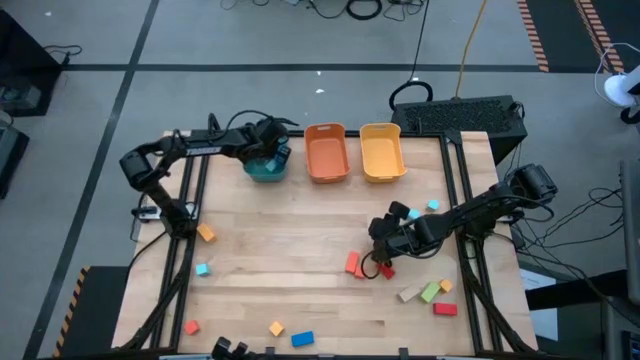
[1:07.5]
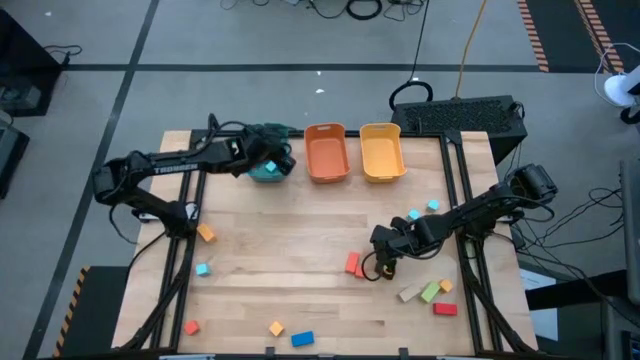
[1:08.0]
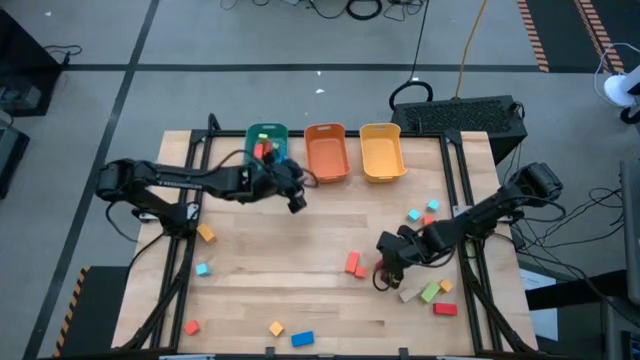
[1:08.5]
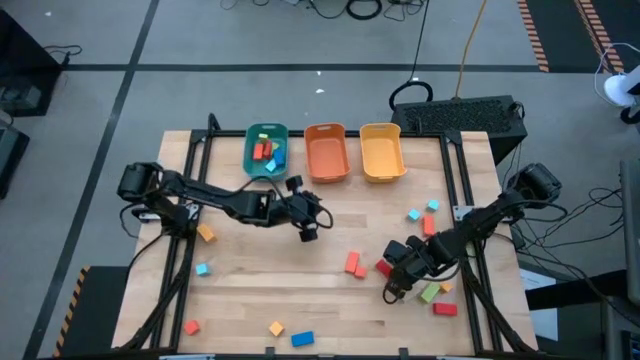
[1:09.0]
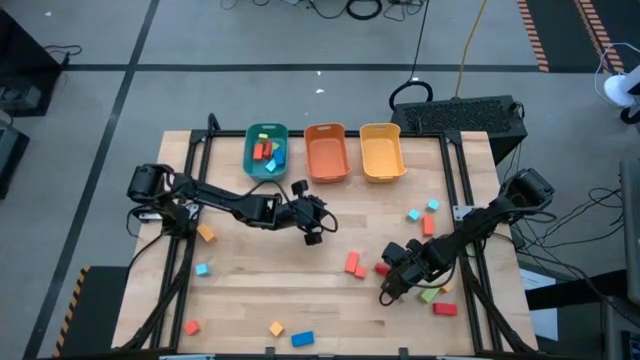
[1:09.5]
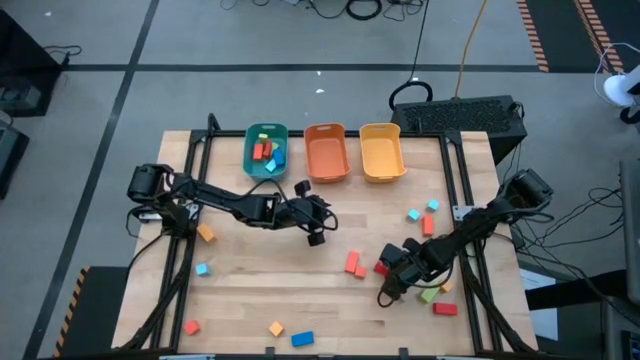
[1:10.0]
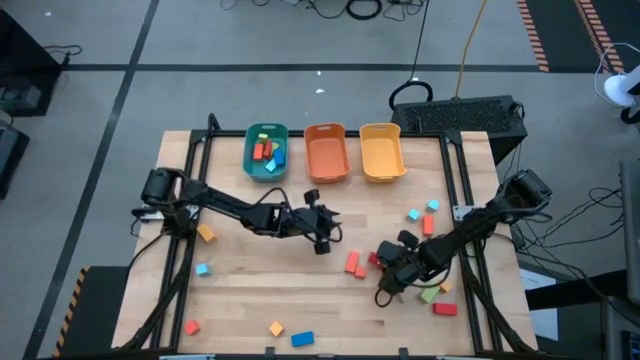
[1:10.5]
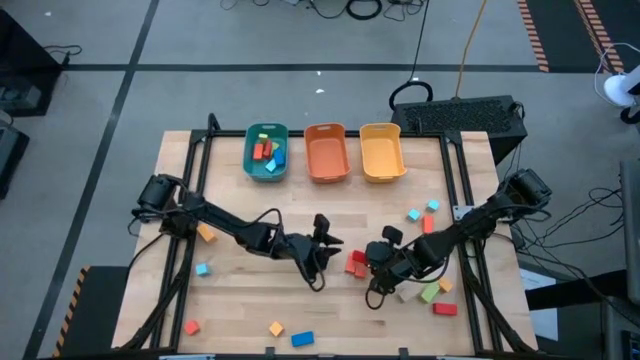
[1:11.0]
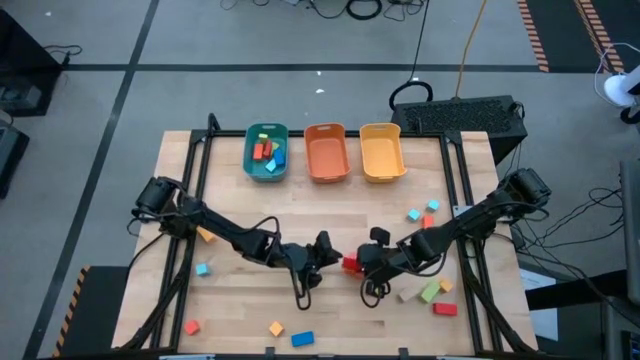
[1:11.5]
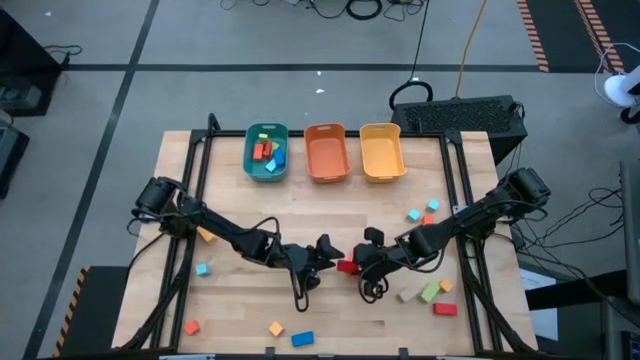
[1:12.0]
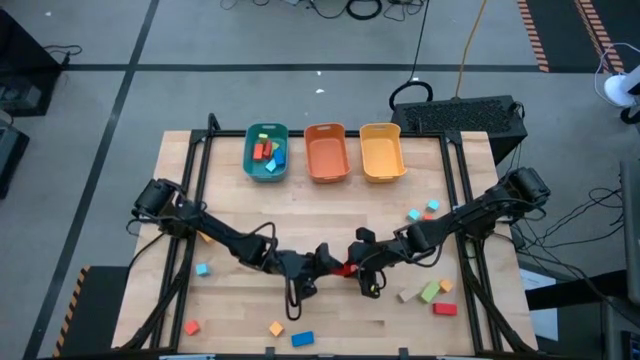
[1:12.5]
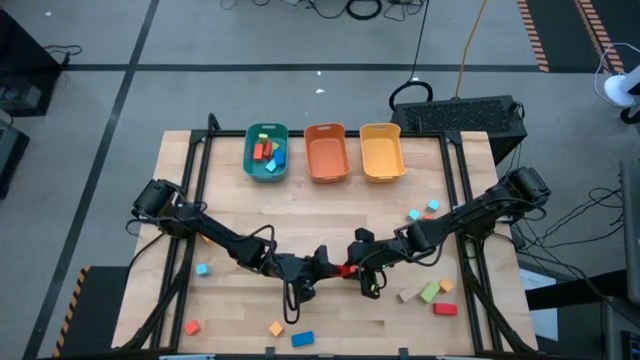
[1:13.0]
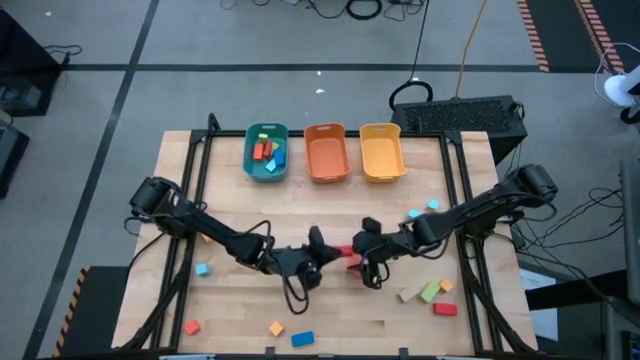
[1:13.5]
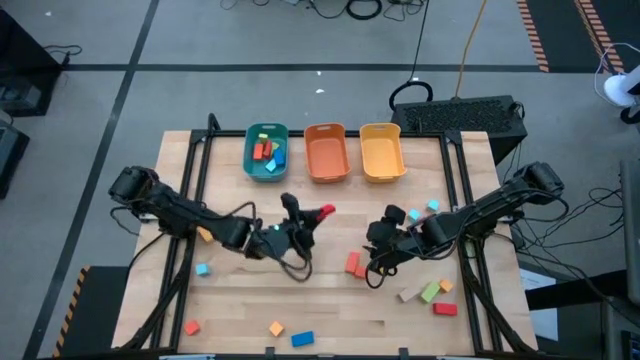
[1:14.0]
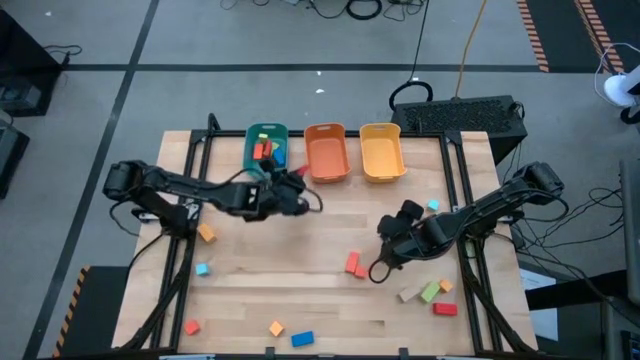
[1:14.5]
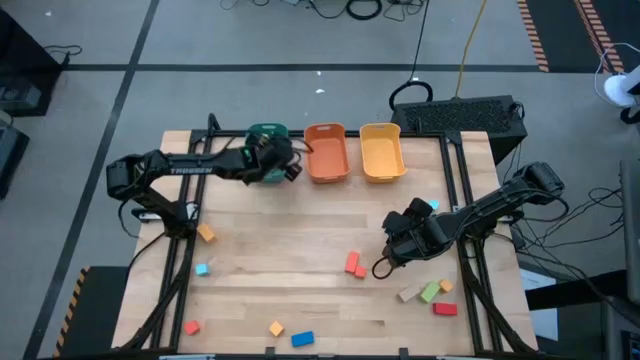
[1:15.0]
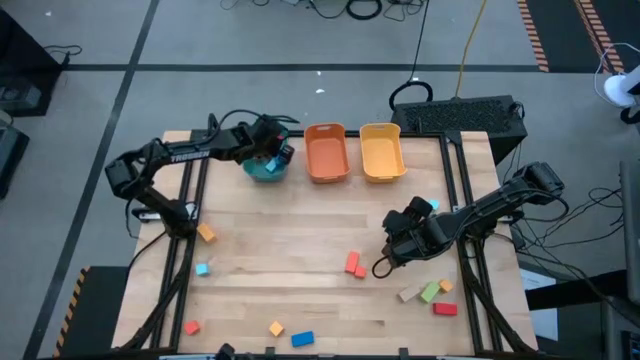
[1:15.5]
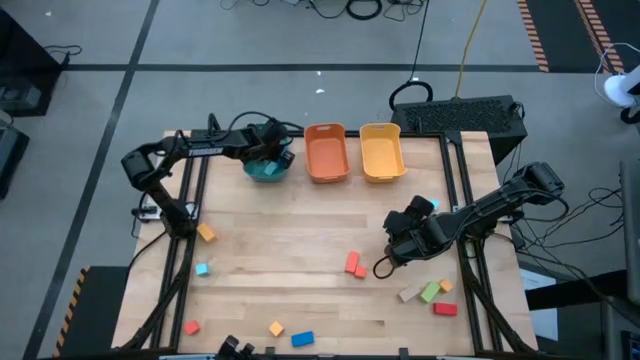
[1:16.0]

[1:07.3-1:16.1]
Task: Sort blocks by size
Put the red thin rectangular block into the blue bin

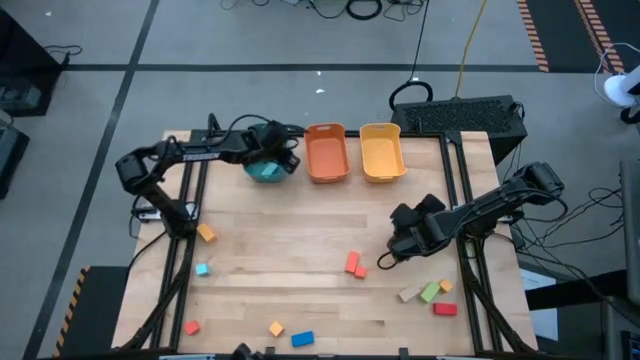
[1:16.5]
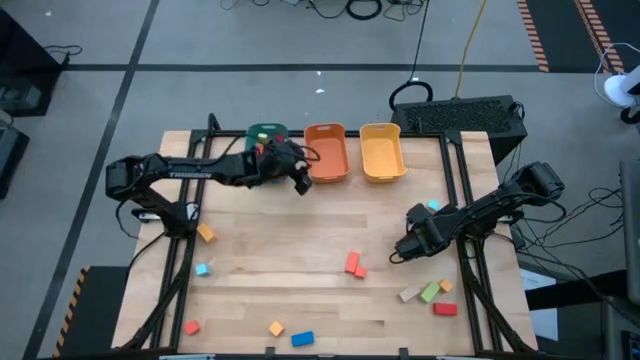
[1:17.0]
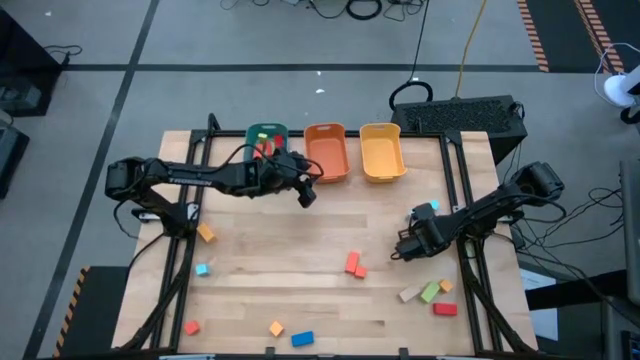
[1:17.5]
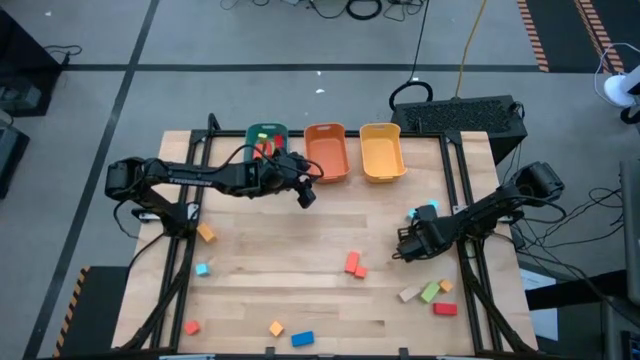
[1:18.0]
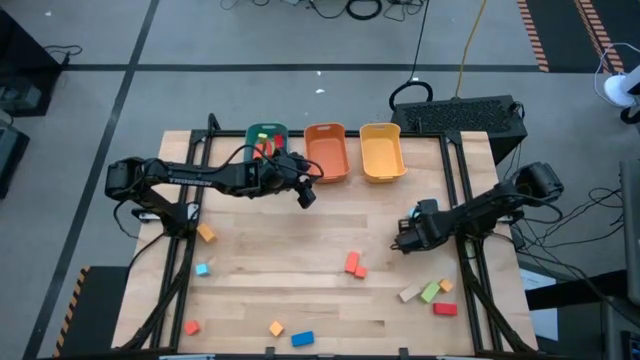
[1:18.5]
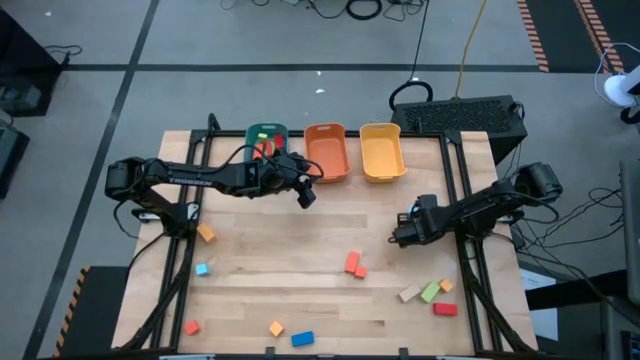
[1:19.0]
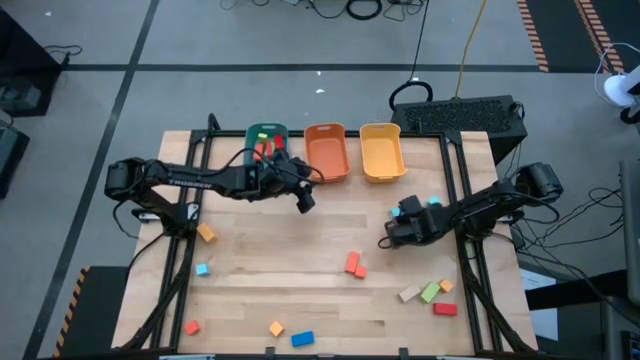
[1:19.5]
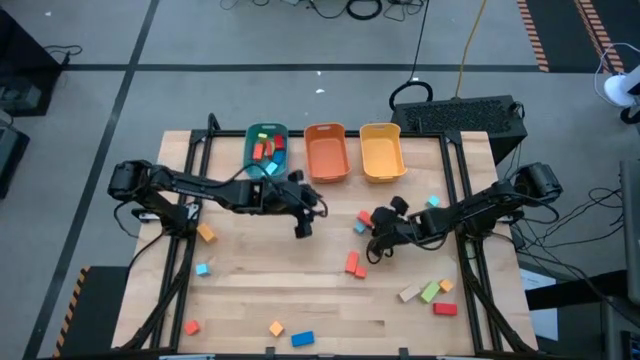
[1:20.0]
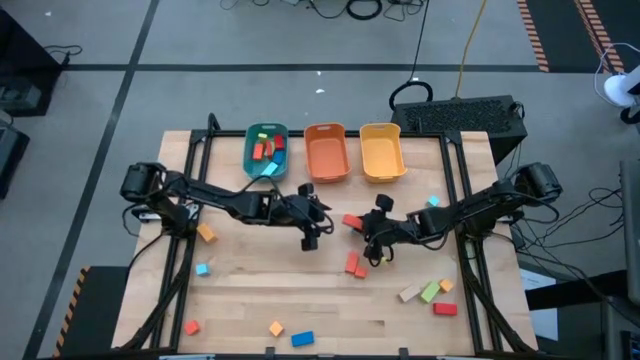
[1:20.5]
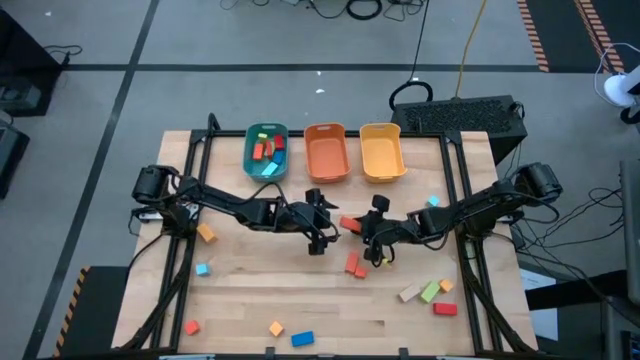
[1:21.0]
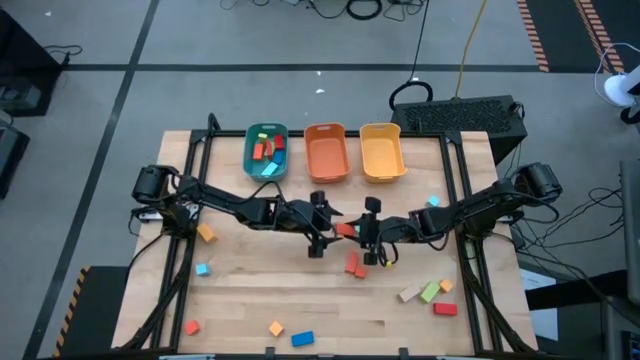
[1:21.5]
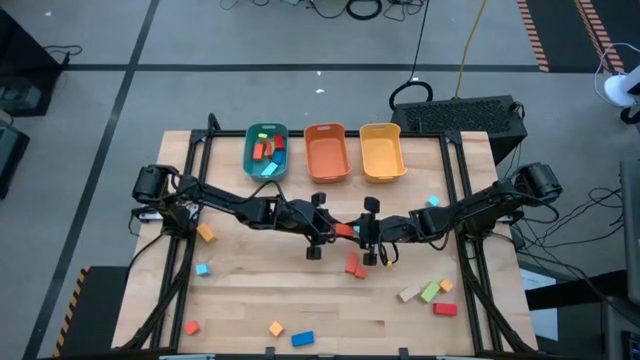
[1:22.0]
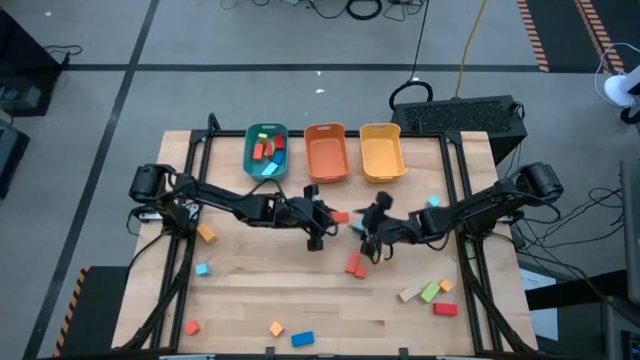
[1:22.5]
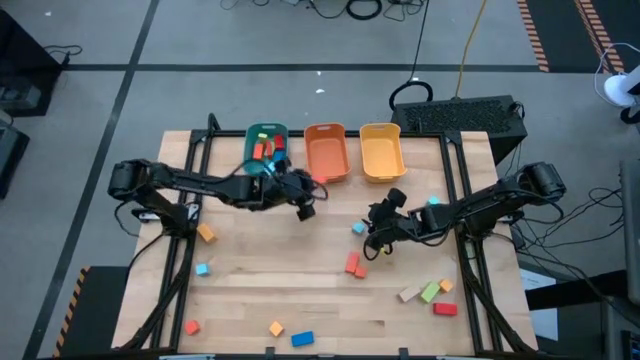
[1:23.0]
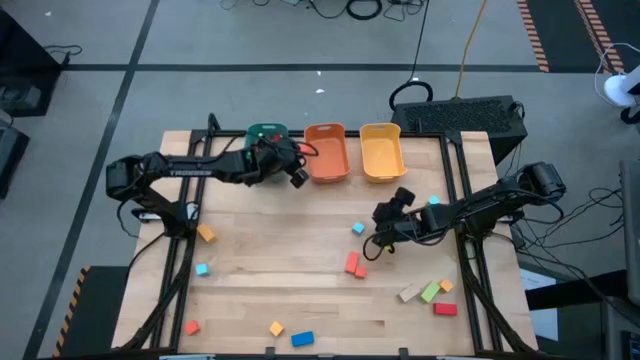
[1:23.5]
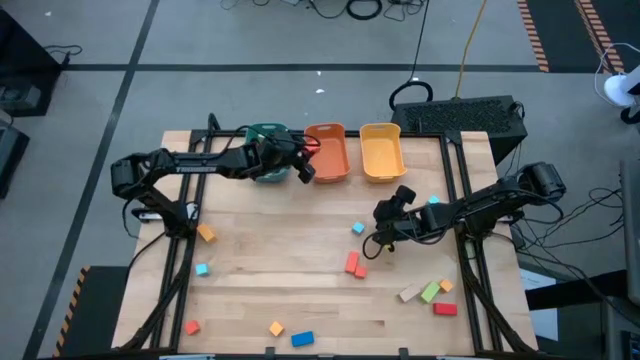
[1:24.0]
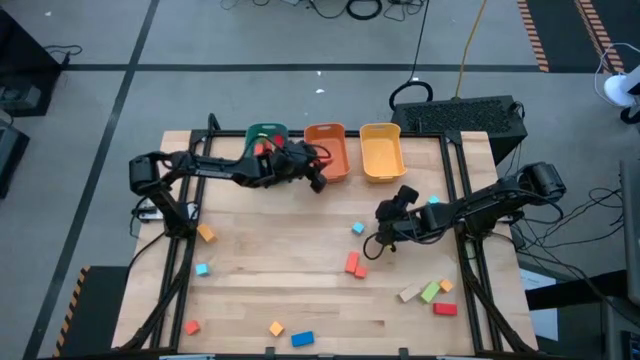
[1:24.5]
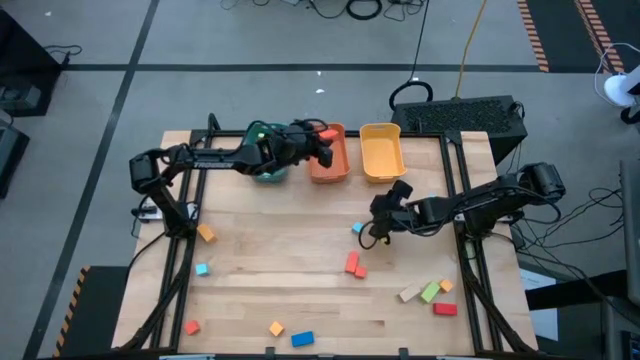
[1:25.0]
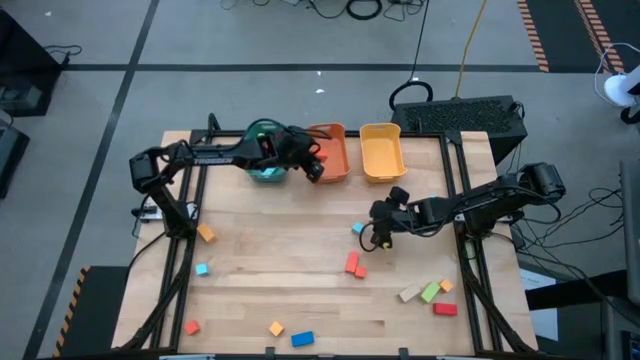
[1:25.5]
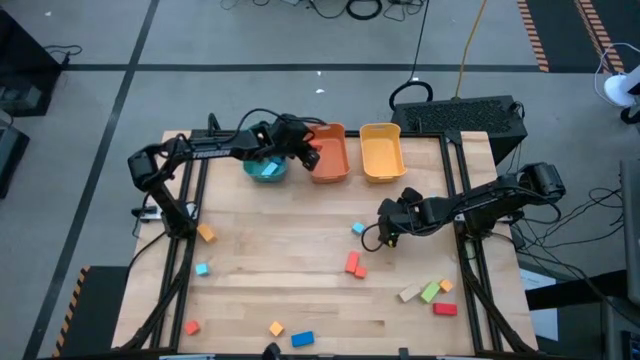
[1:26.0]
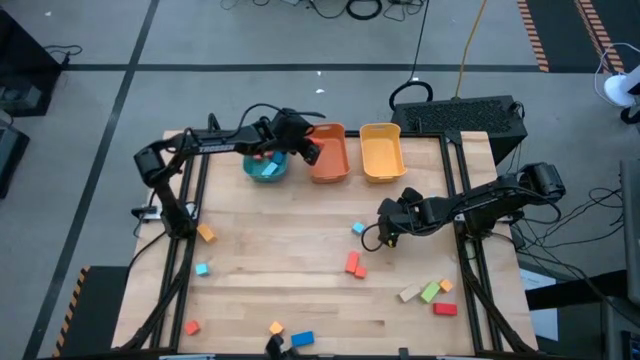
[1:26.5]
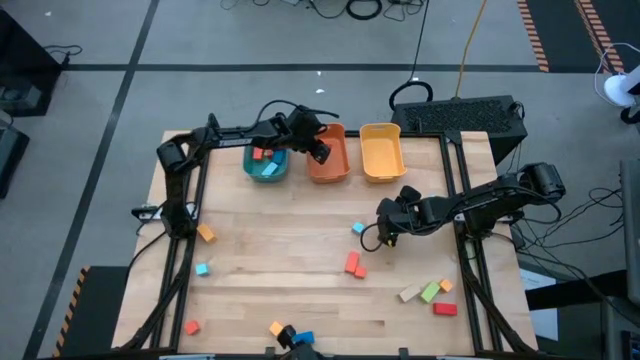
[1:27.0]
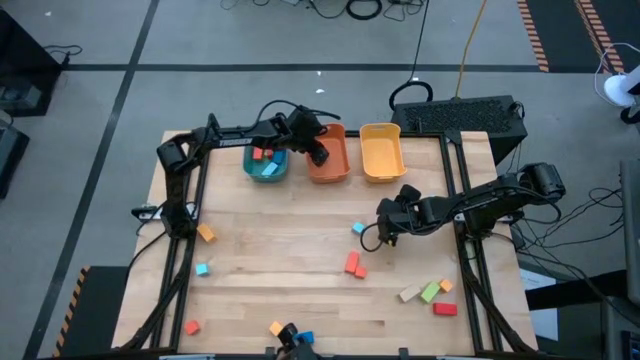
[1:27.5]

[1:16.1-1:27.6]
Put the right orange thick rectangular block into the orange bin
